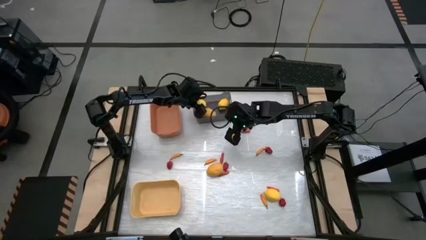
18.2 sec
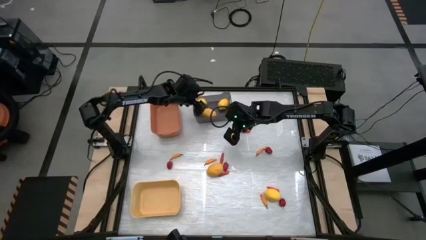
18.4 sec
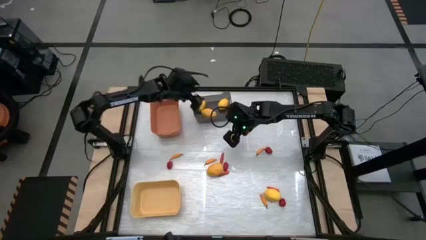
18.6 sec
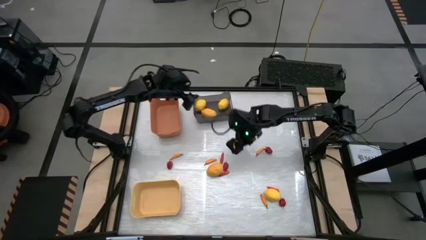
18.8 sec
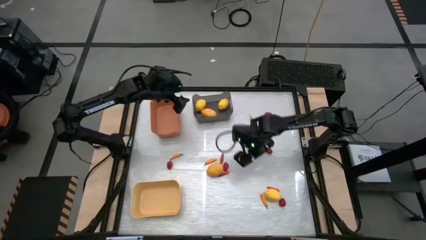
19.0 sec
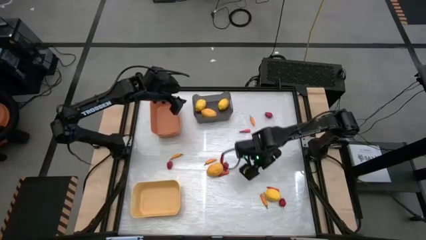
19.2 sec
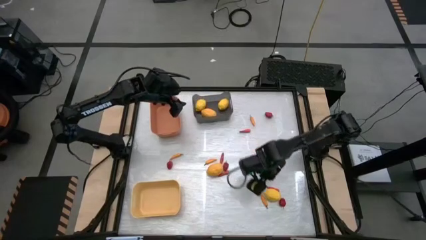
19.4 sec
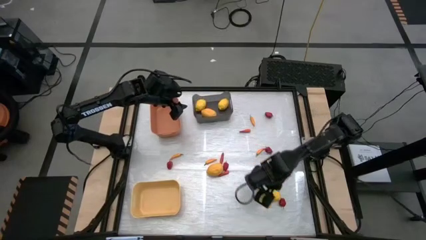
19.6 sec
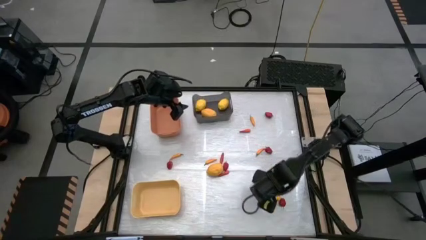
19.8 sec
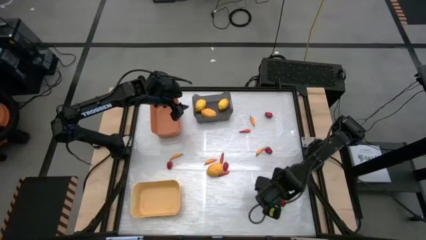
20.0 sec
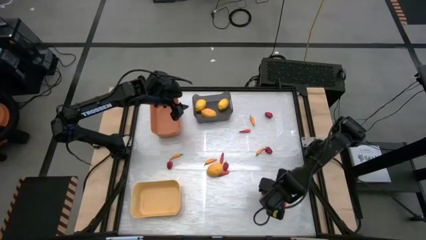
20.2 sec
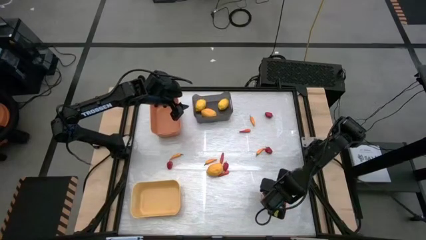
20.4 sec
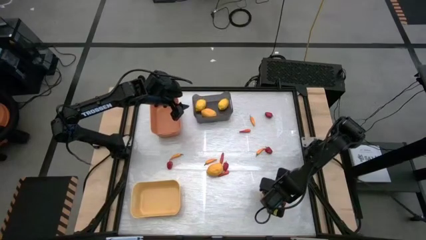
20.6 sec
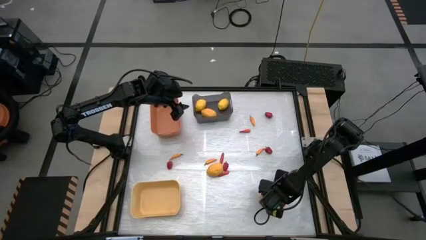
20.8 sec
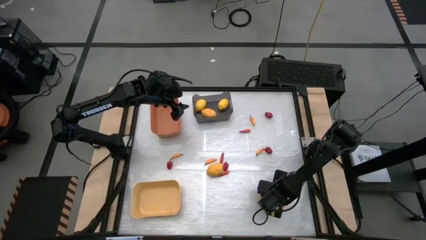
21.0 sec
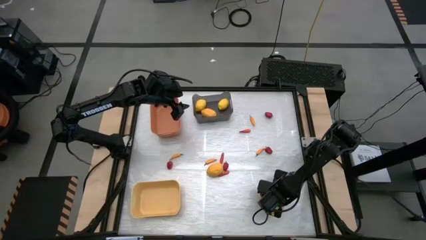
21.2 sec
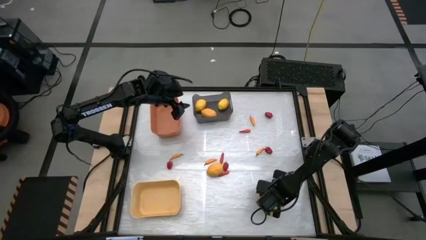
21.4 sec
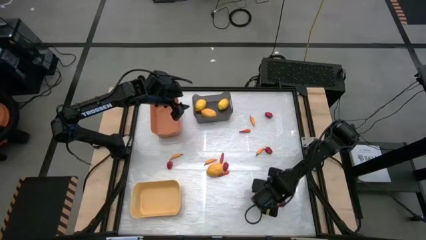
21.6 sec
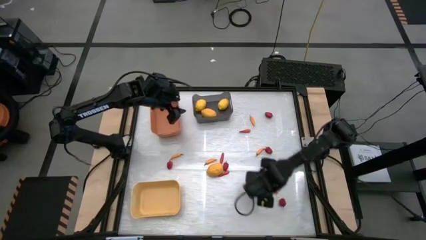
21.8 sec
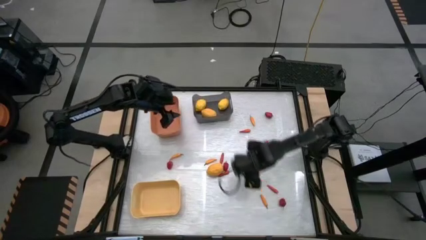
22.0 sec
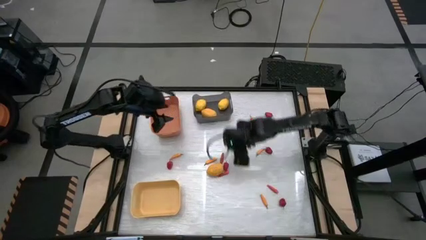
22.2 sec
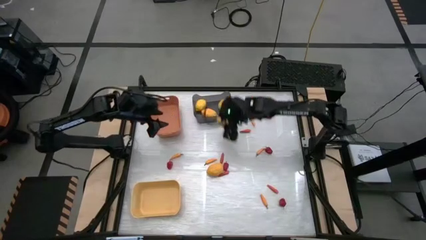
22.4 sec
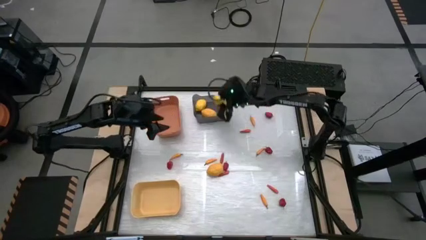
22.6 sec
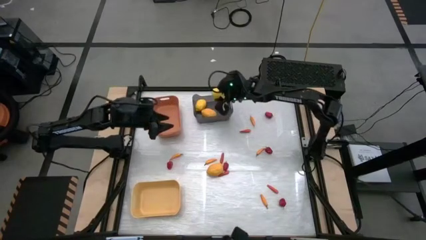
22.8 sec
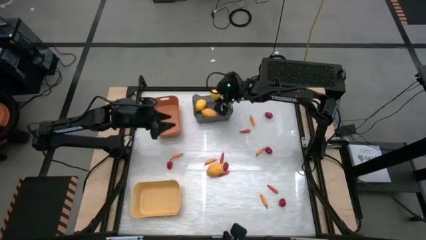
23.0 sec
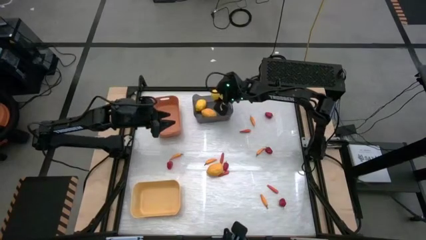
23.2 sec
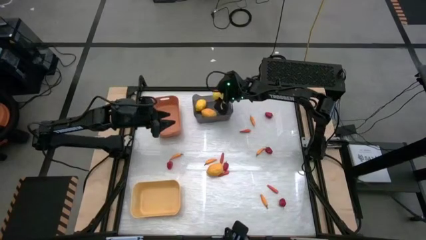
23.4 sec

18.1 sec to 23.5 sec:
Task: Sort produce into baskets
Put the yellow lemon into the black bin

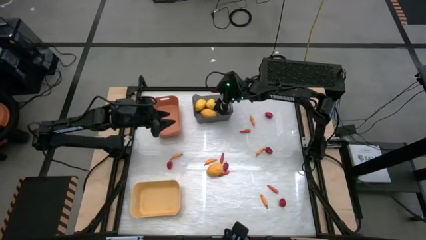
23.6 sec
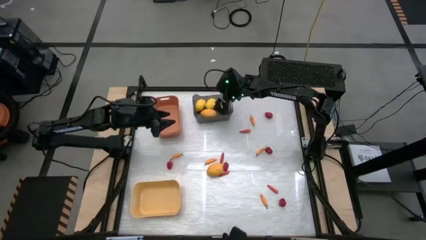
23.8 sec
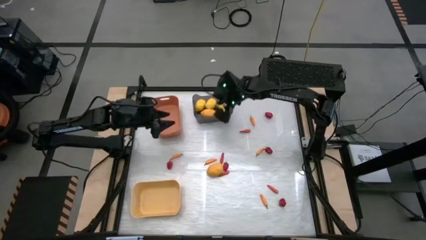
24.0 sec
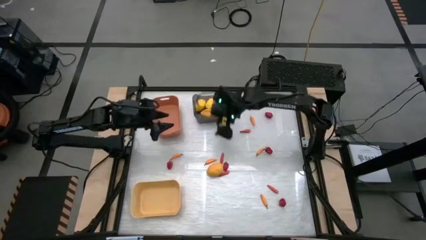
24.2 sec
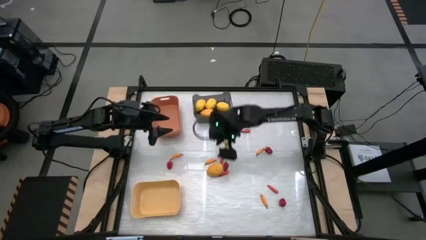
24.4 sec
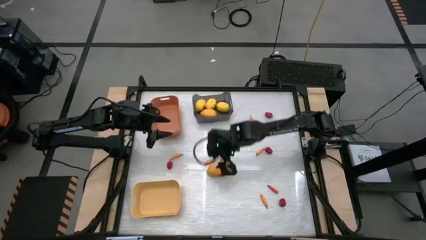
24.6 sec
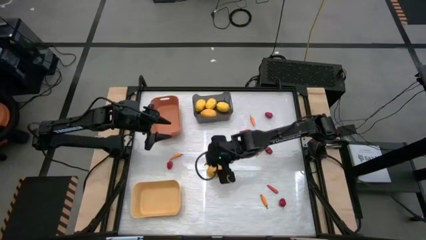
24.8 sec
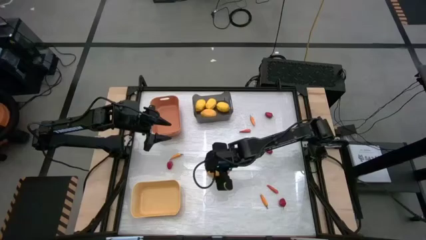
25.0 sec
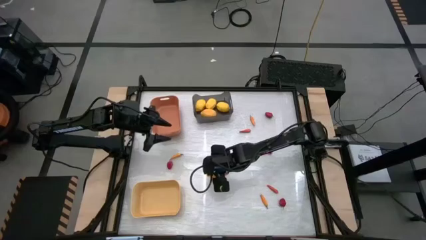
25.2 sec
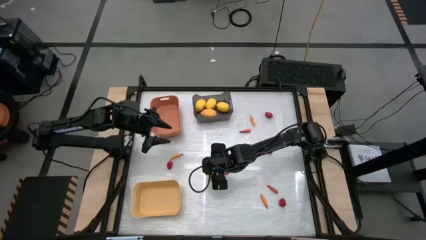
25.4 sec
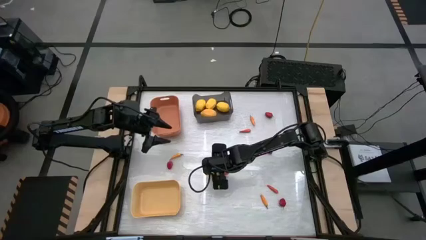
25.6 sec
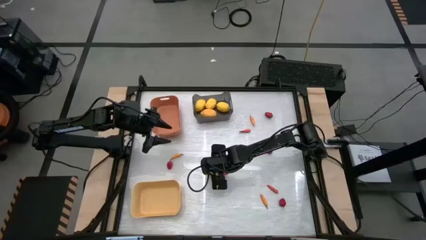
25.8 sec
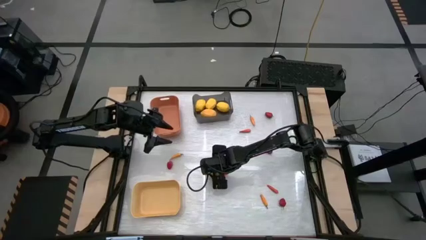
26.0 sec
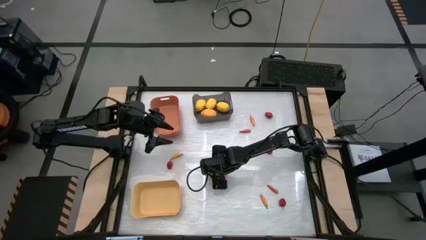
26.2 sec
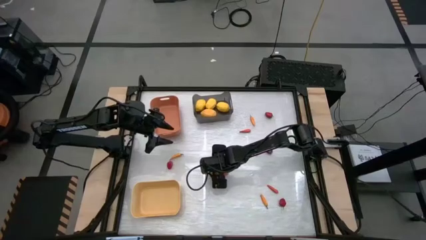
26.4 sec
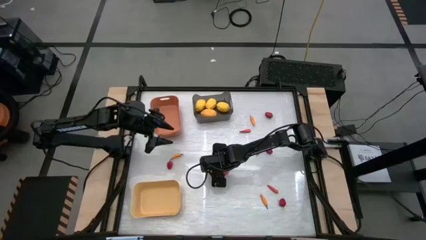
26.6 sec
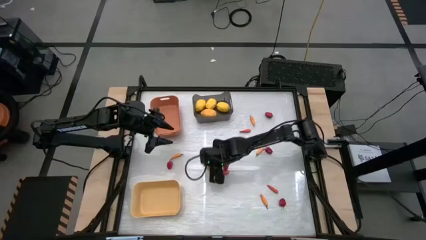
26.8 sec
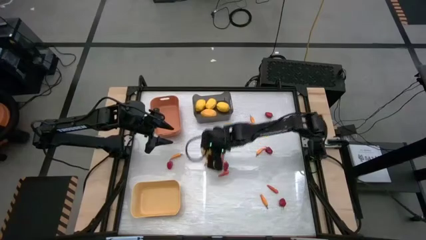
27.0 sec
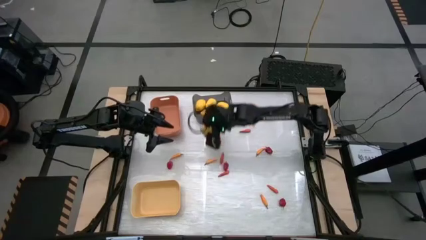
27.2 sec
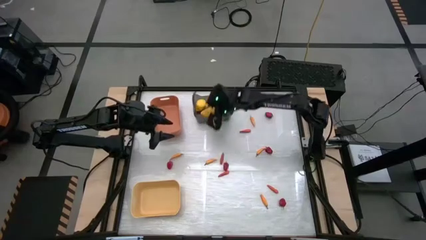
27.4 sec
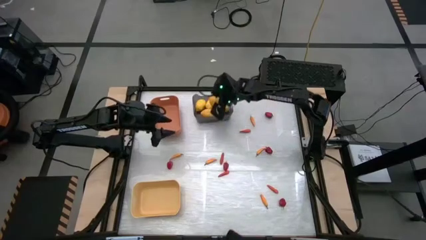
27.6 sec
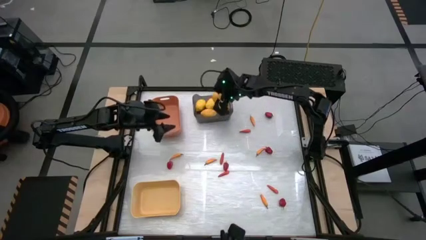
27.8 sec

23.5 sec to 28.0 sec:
Put the yellow lemon into the black bin

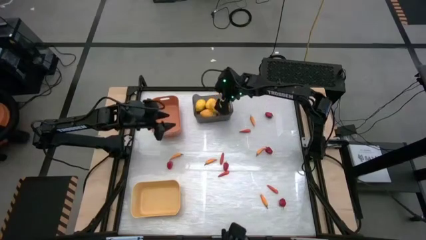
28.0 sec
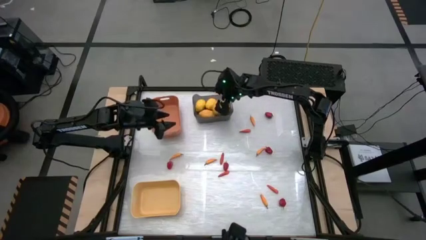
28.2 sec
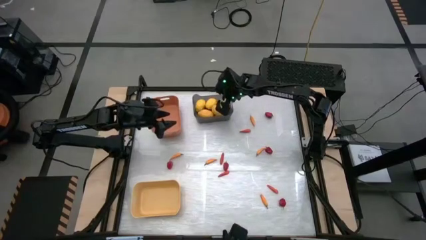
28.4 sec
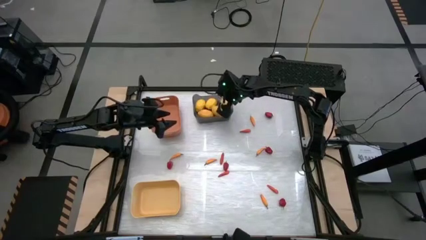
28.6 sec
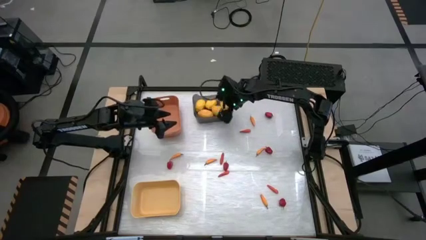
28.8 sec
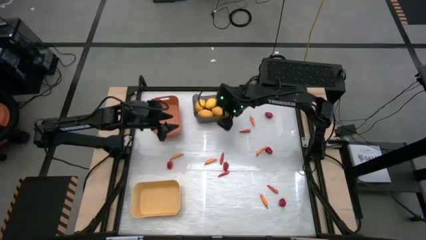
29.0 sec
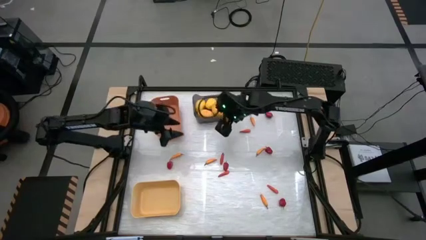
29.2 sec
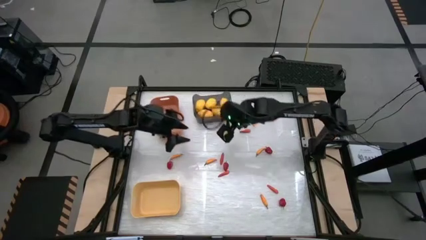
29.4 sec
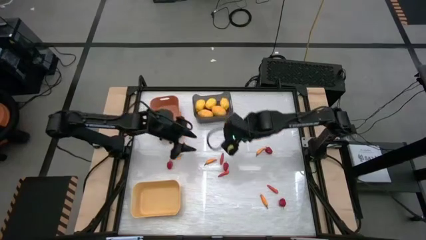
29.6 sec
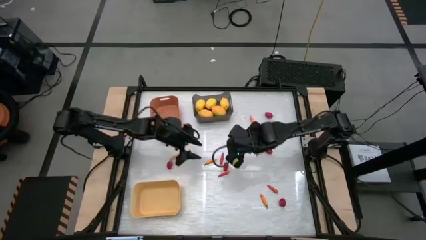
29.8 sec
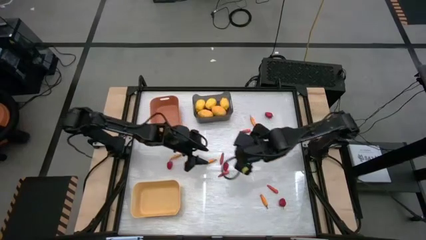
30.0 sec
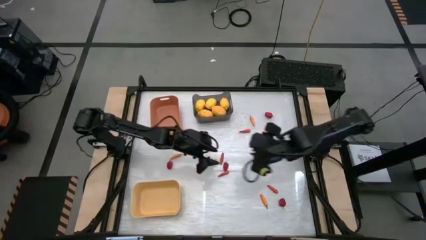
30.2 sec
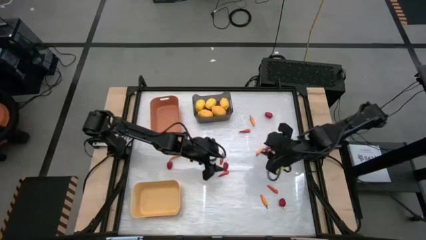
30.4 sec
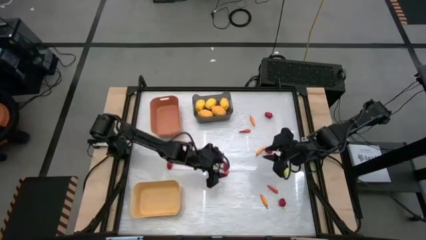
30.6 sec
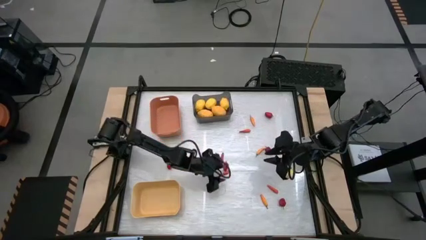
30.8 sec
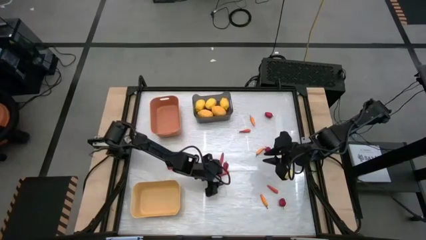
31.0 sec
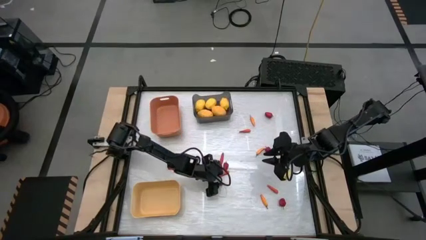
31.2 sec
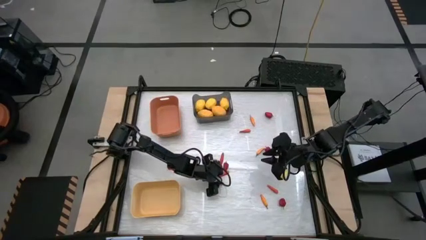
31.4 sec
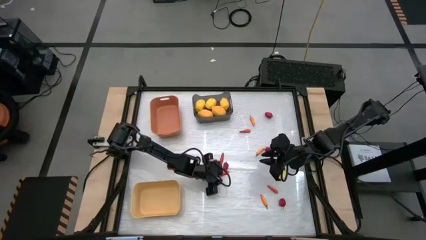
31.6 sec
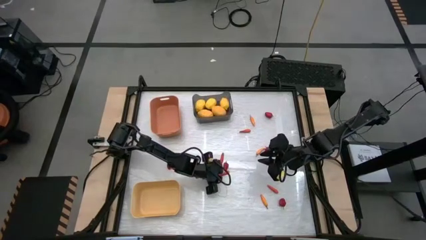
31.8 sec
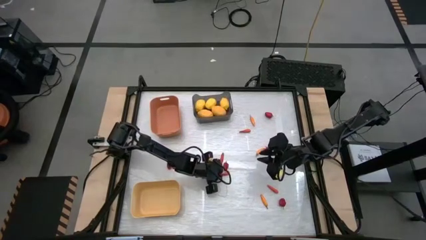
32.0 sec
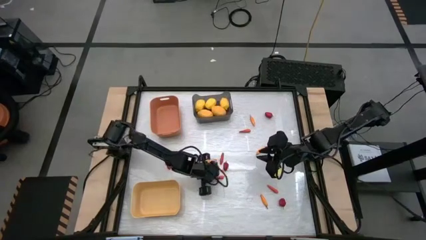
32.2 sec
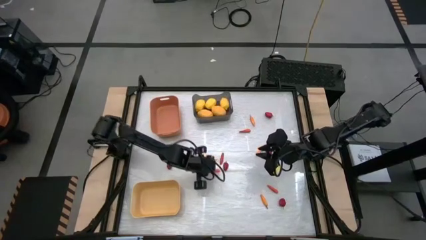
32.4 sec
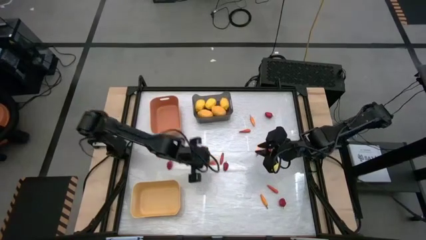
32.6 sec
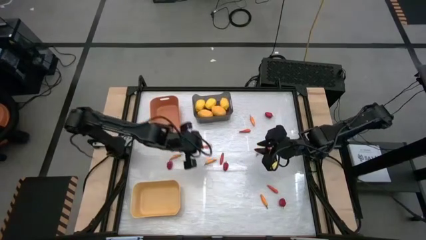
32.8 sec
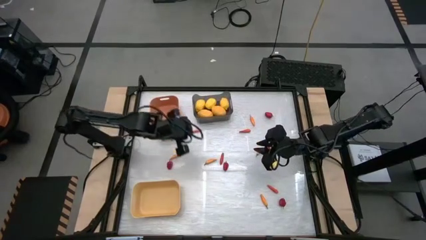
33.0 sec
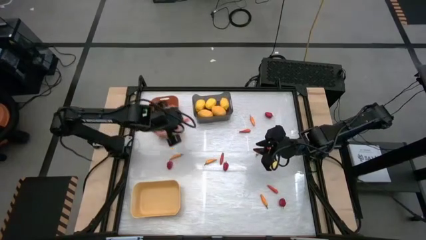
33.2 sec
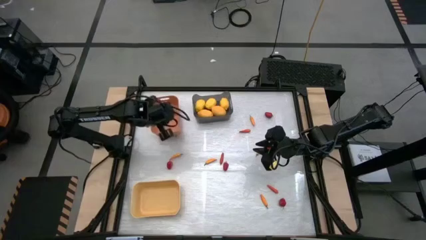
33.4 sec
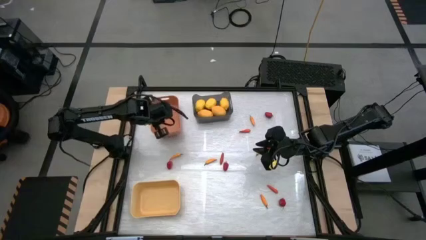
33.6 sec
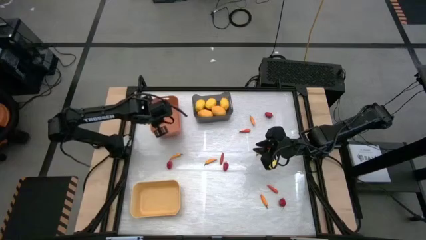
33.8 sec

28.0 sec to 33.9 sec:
Put the orange chili pepper into the orange bin
